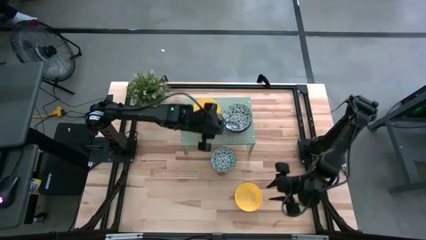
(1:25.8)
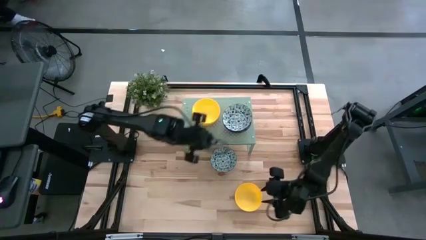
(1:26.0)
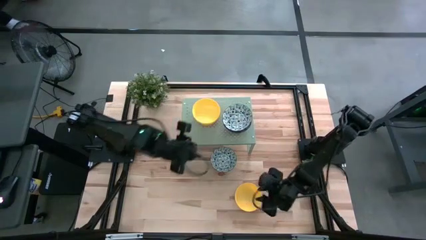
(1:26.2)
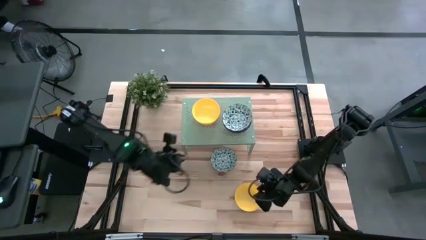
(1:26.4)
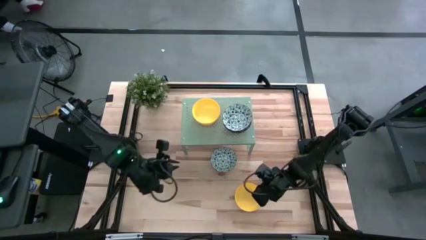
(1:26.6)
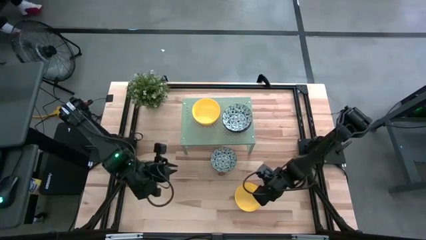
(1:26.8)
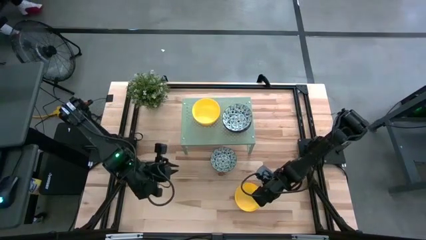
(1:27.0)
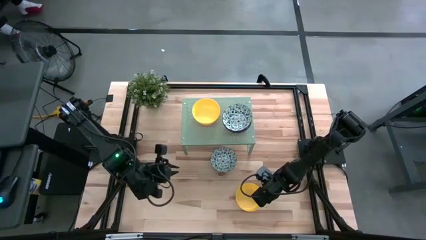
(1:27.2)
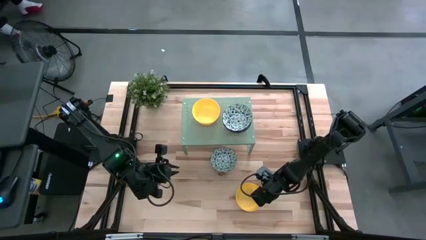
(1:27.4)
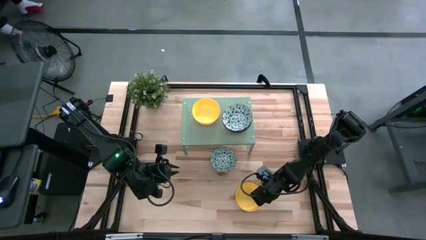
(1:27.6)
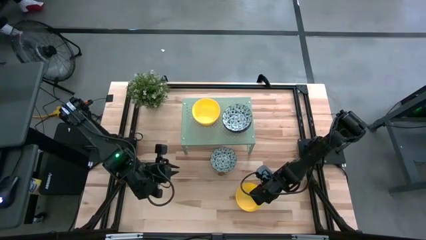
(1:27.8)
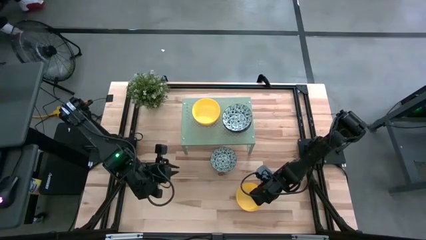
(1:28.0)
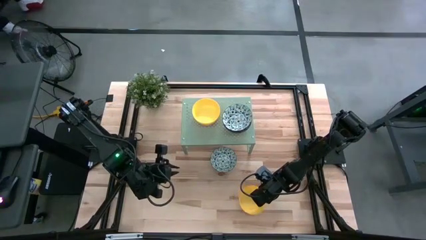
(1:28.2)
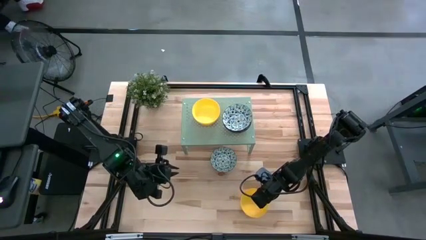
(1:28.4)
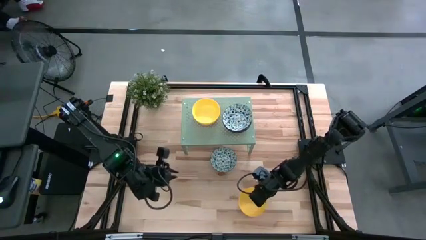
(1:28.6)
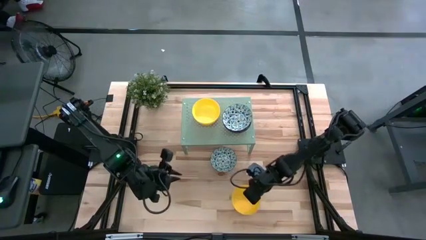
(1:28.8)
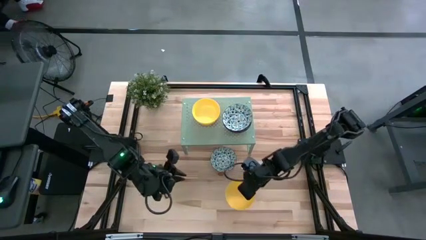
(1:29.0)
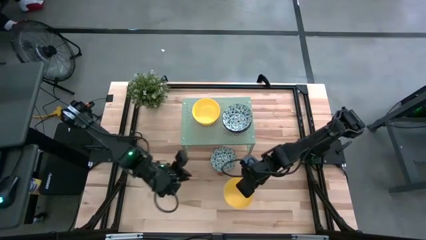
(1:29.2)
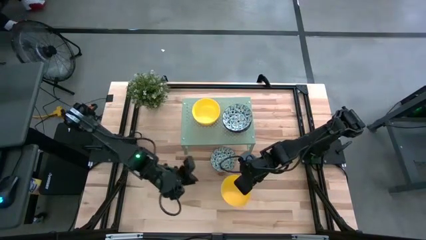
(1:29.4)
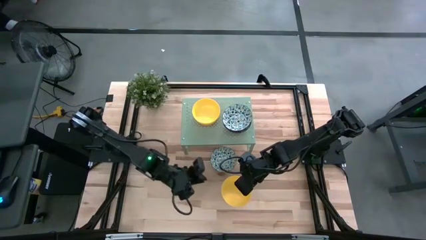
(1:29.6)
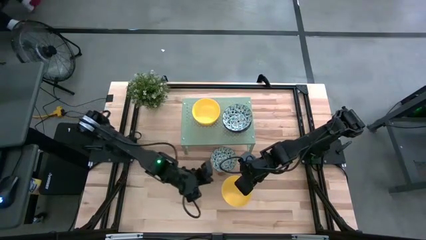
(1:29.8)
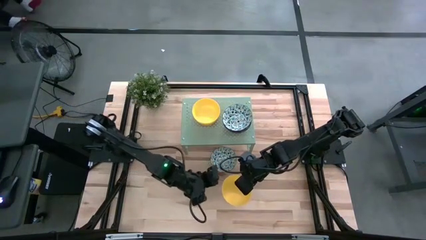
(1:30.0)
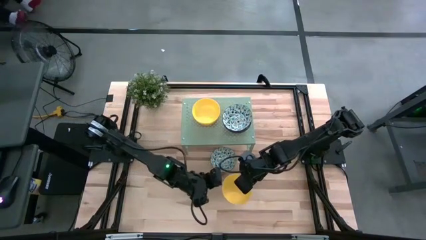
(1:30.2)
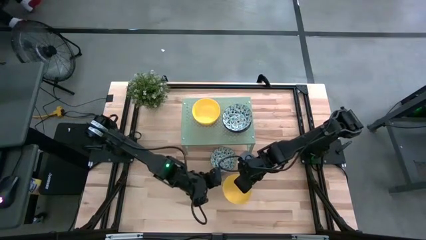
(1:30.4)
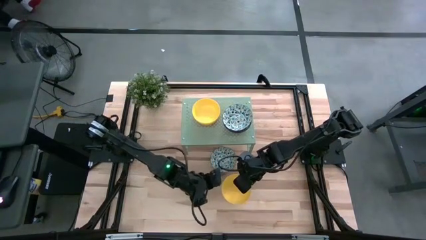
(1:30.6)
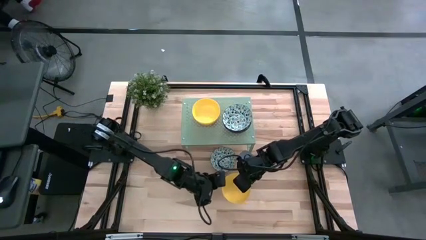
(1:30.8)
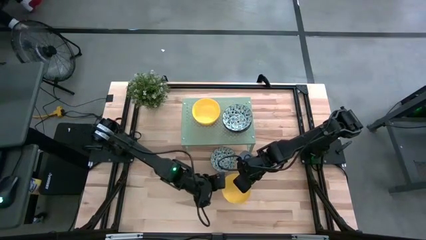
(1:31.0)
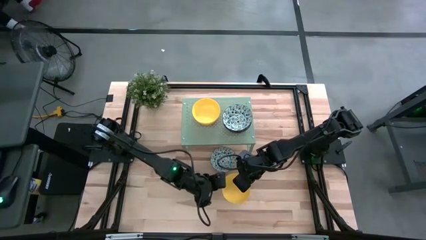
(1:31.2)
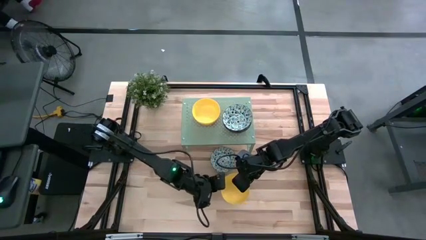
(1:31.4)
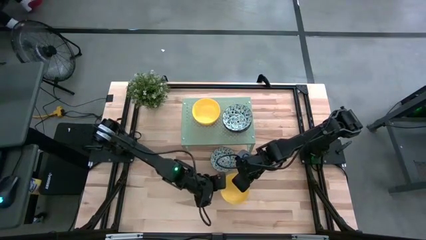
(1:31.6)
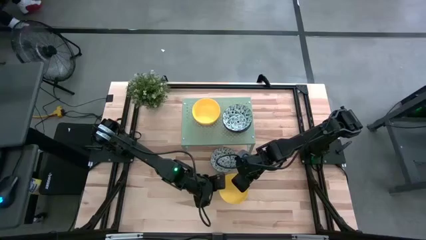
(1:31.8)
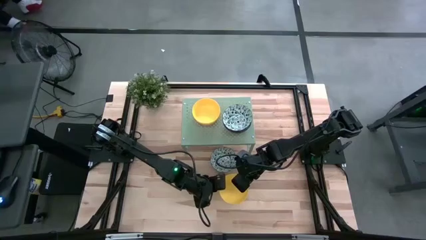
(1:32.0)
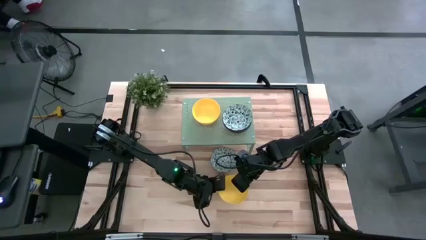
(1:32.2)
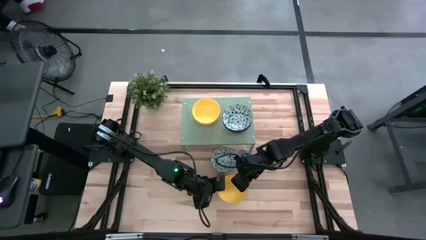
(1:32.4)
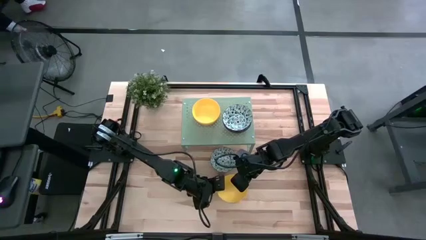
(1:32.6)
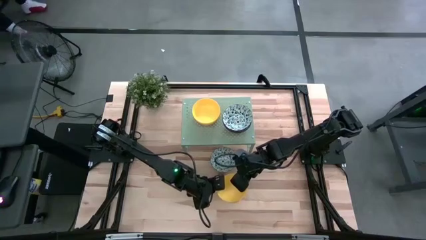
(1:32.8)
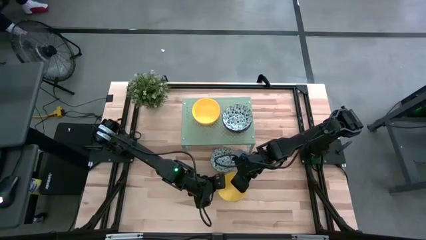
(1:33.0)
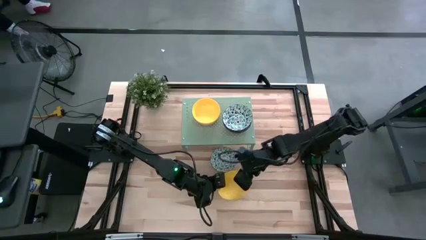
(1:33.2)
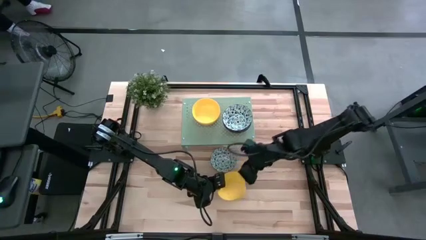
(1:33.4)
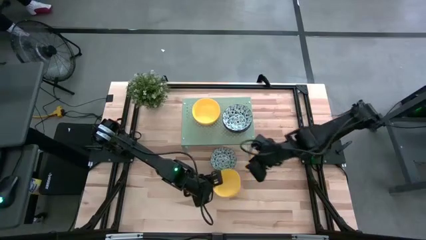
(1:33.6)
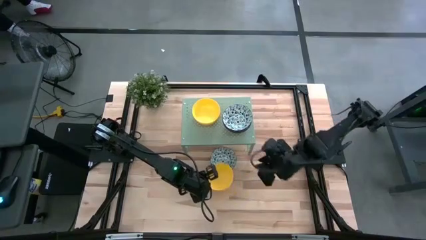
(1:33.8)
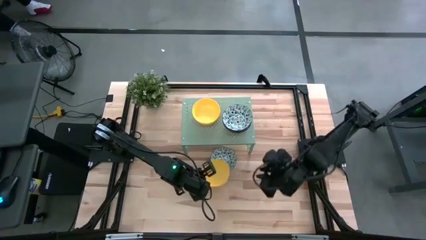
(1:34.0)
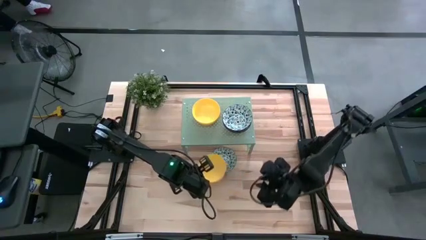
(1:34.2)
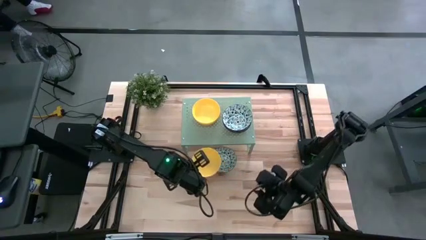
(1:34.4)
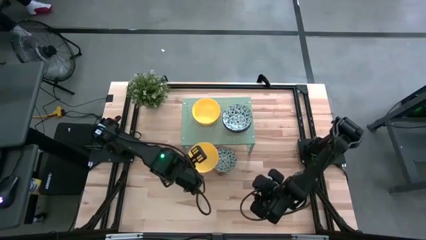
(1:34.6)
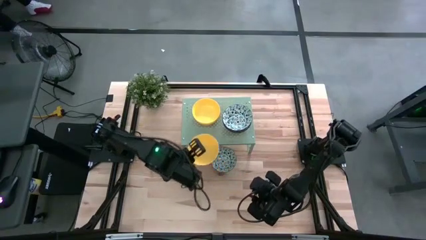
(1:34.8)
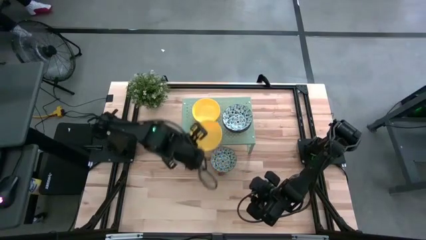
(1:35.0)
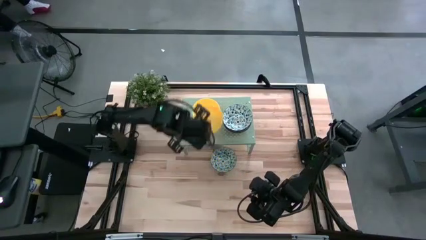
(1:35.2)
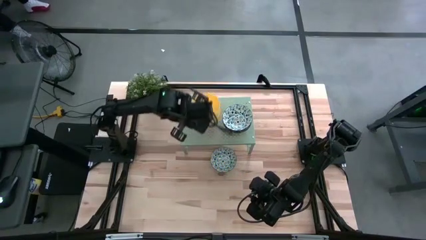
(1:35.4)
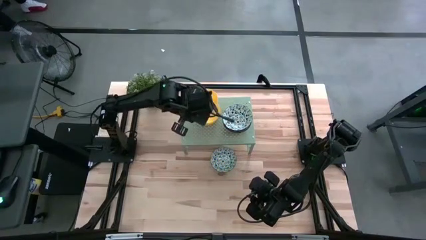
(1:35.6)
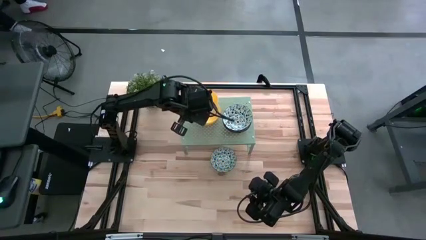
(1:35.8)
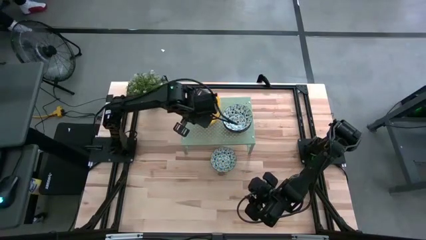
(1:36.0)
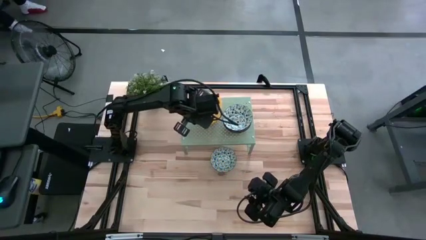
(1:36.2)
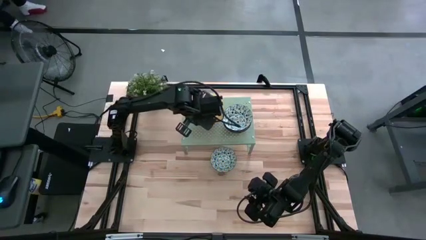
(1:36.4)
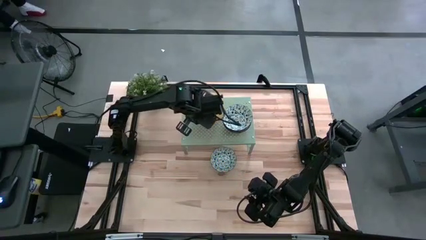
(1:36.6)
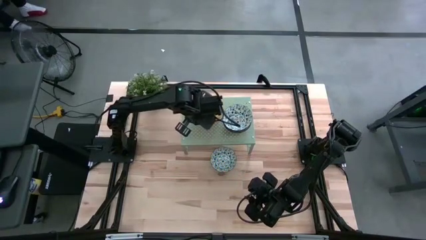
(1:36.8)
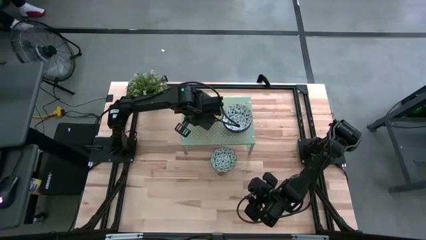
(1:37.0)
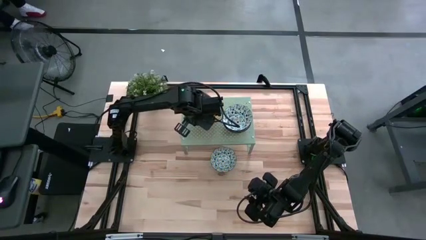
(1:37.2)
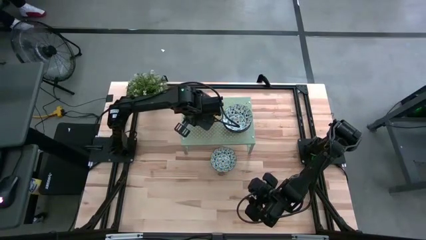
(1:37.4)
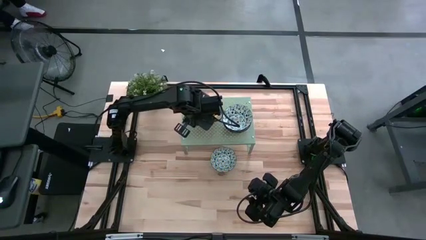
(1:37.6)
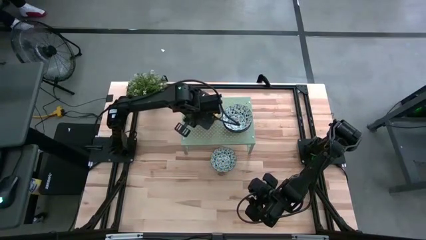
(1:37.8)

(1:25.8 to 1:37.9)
Task: Pick & Place Mini bowls
Stack the yellow bowl on top of the yellow bowl on the shelf

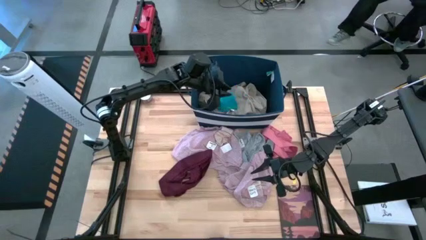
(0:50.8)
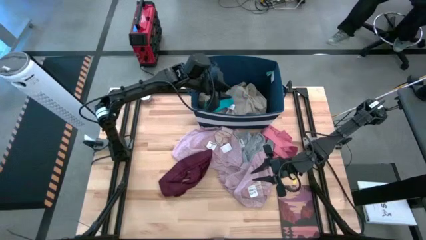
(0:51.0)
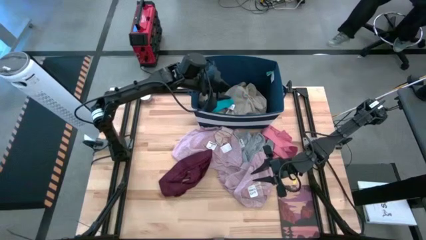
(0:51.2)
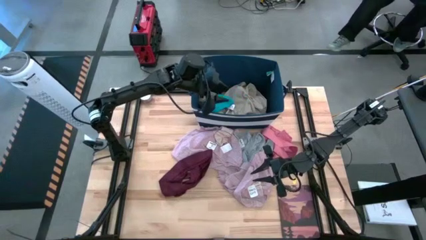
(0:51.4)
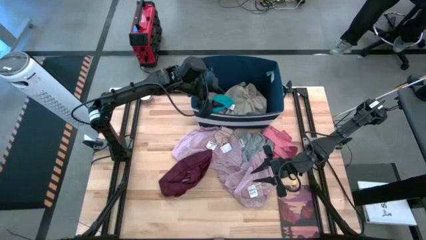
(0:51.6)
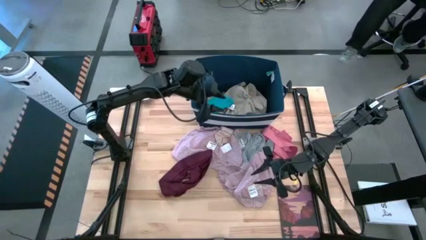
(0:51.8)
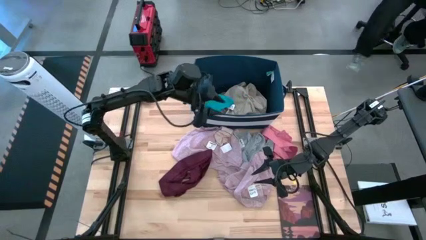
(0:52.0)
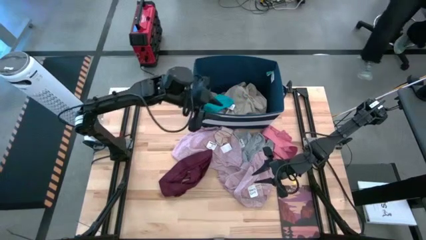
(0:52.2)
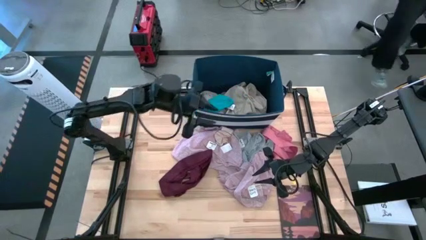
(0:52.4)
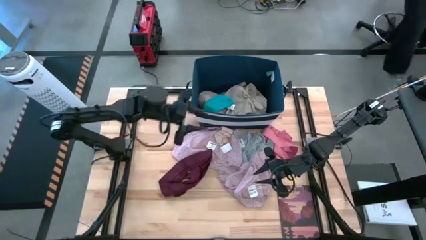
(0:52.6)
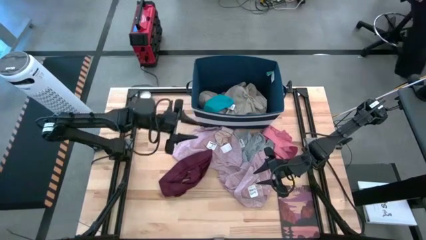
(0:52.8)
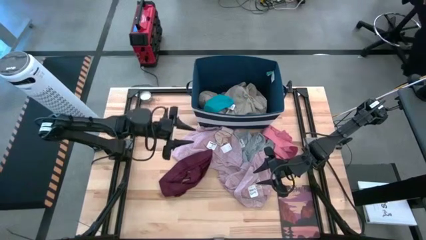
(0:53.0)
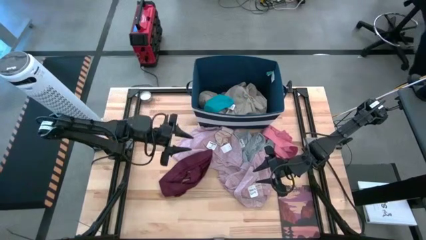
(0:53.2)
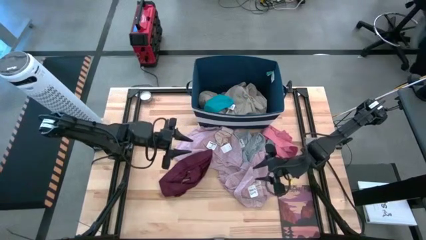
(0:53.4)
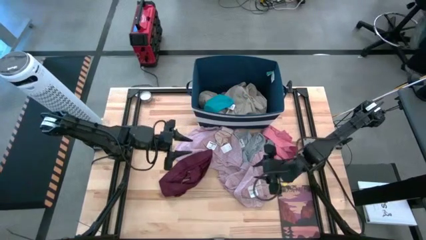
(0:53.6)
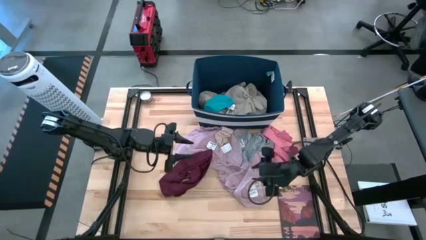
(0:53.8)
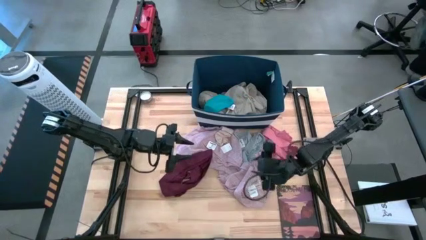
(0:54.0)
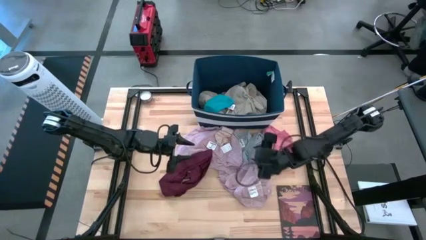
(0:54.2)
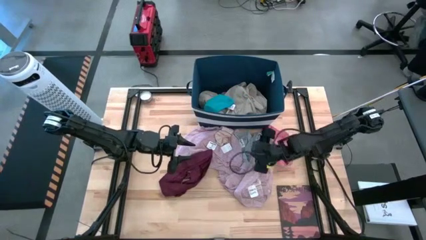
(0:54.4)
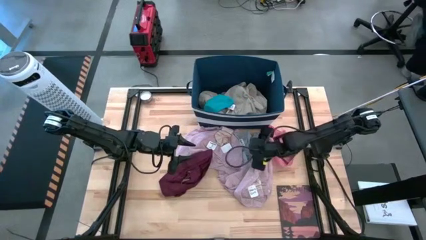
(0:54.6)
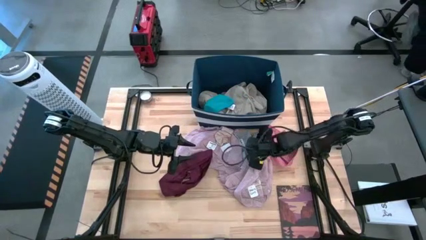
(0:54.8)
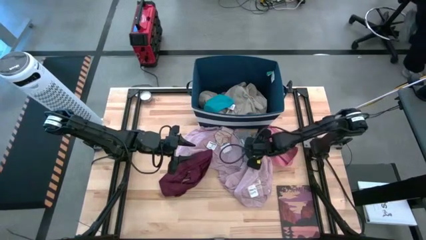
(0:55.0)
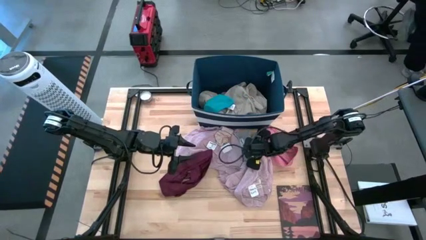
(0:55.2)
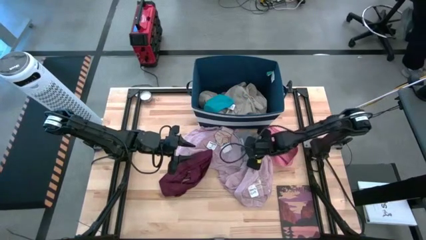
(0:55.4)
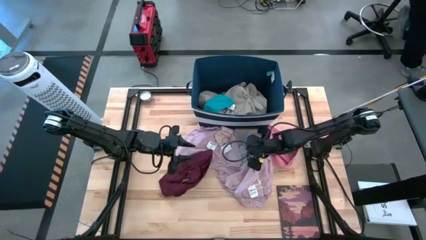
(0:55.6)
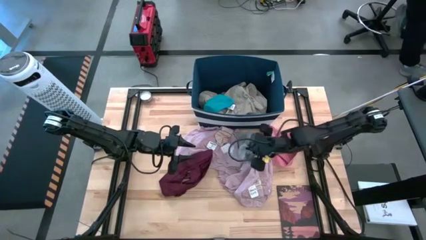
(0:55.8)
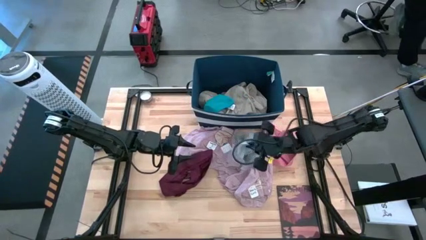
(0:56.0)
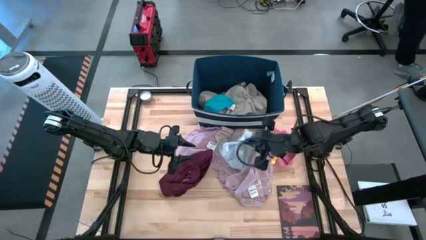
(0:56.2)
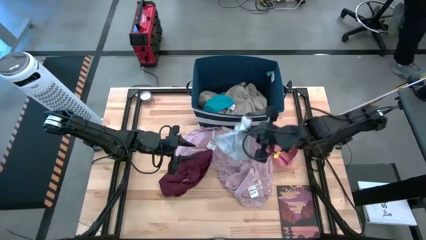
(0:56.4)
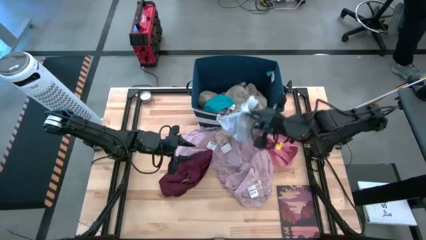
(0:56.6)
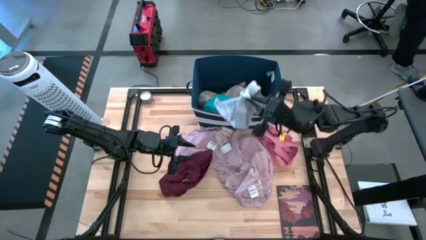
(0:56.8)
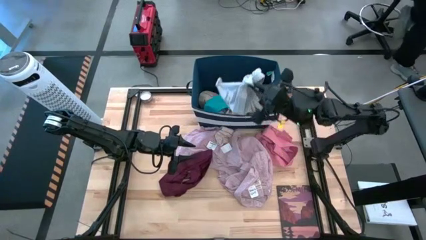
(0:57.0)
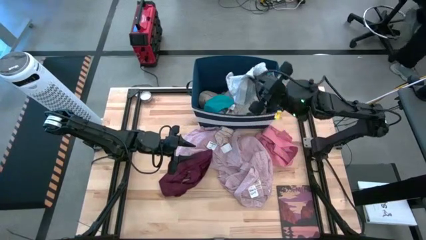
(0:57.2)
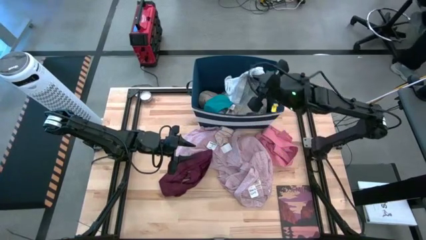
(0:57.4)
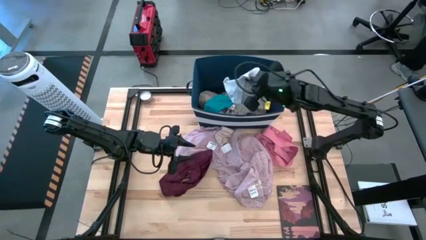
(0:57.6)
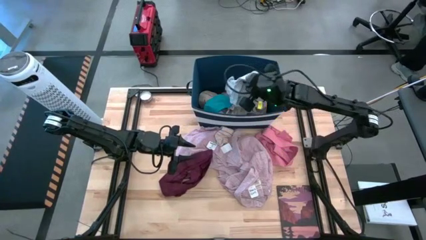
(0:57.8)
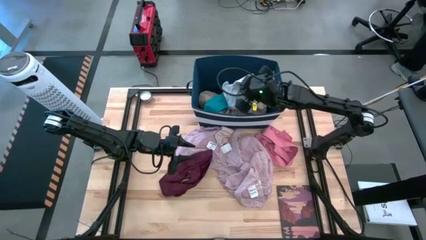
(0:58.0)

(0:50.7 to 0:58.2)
Task: Sort clothes
Put the gray shorts into the blue laundry organizer
